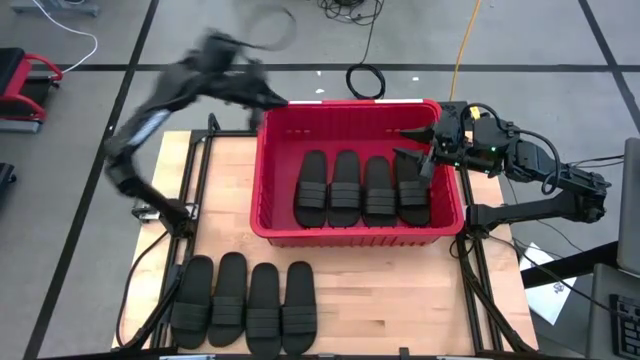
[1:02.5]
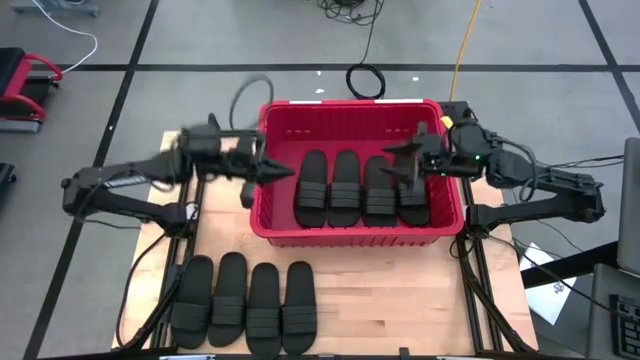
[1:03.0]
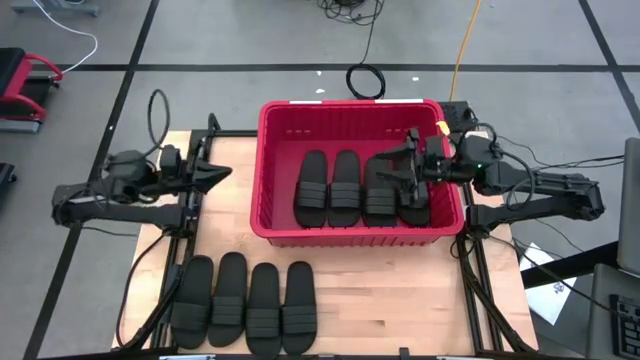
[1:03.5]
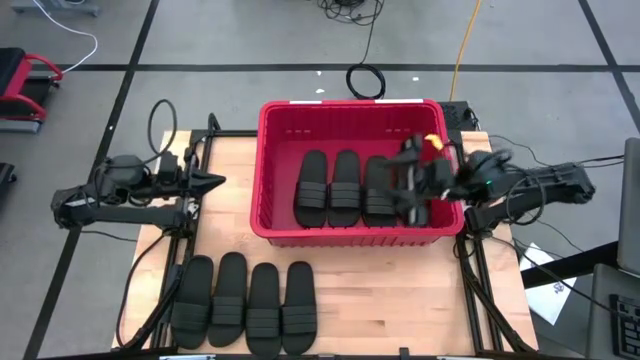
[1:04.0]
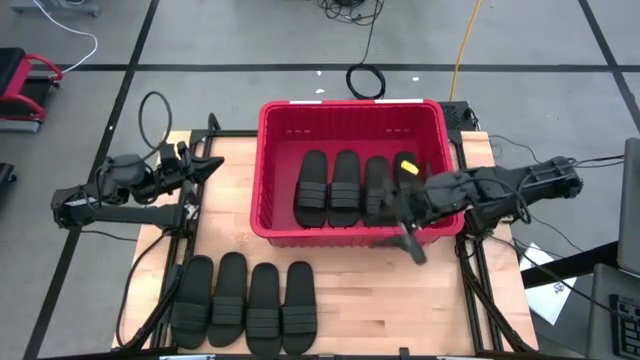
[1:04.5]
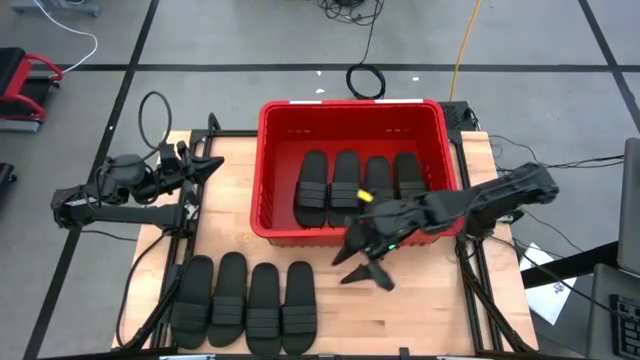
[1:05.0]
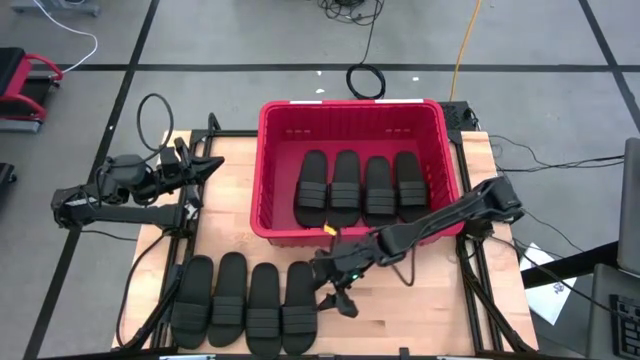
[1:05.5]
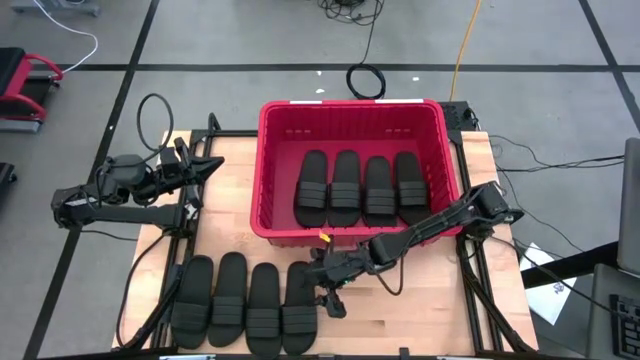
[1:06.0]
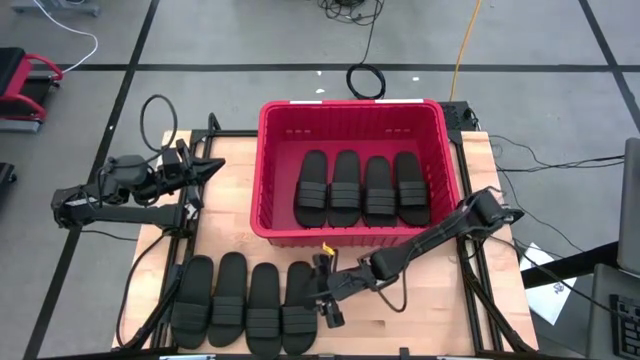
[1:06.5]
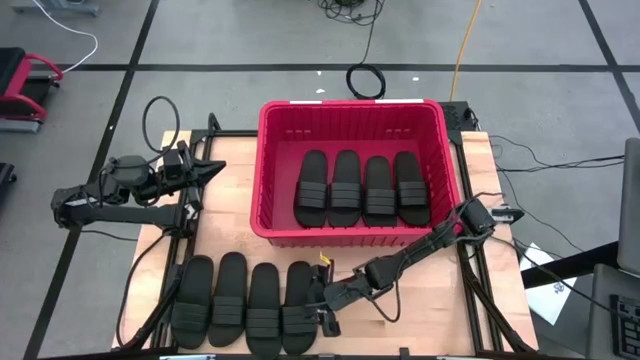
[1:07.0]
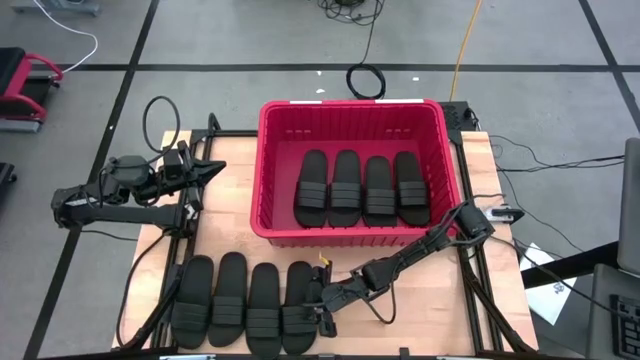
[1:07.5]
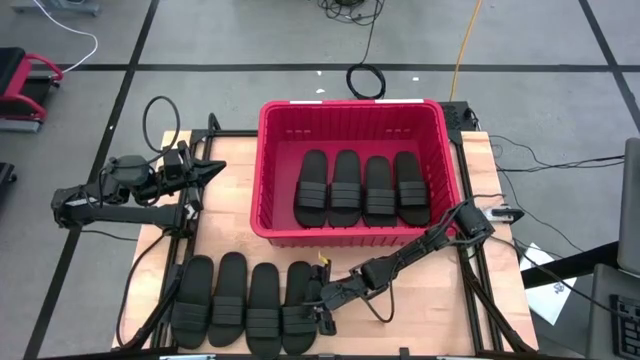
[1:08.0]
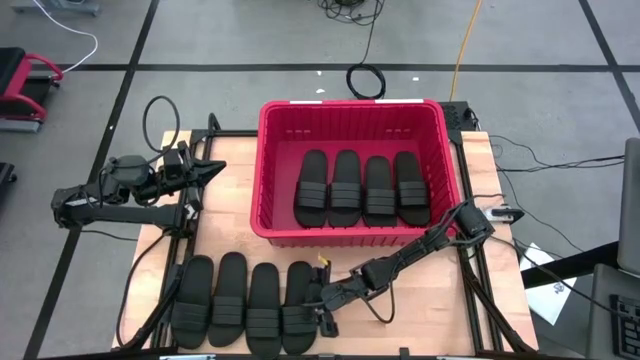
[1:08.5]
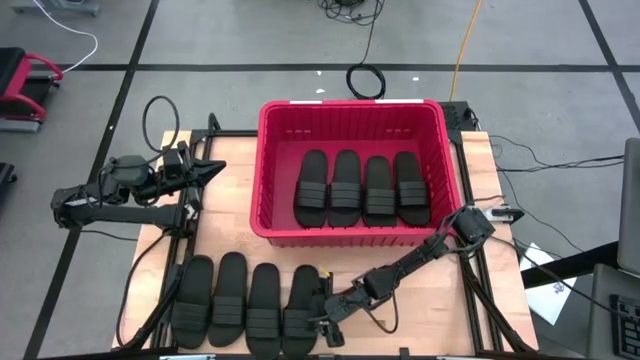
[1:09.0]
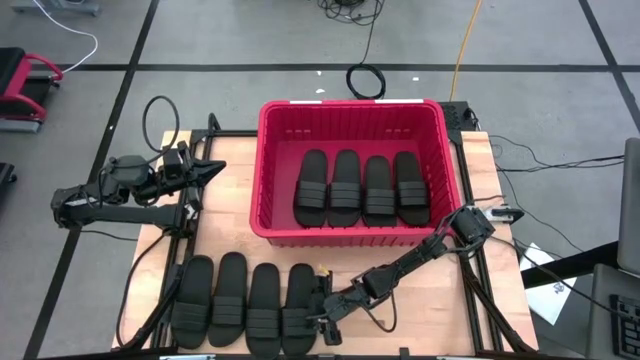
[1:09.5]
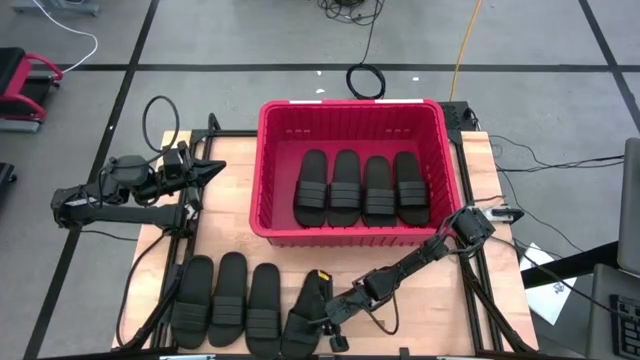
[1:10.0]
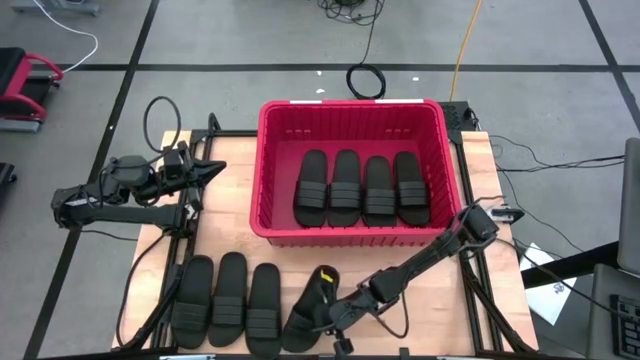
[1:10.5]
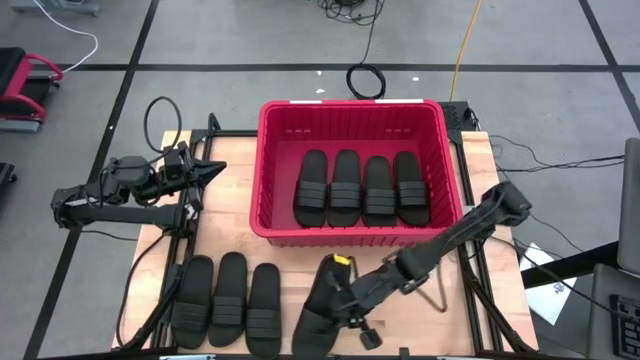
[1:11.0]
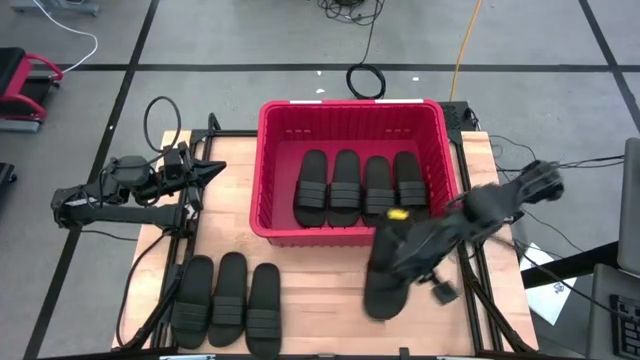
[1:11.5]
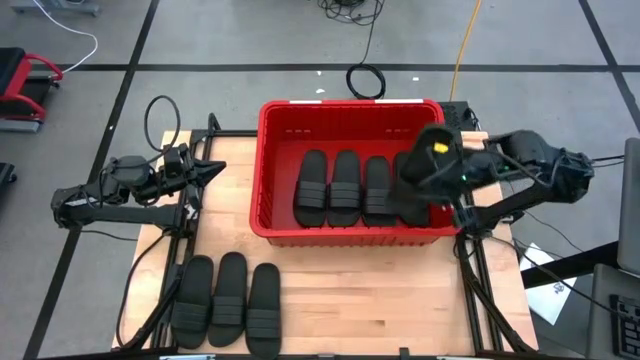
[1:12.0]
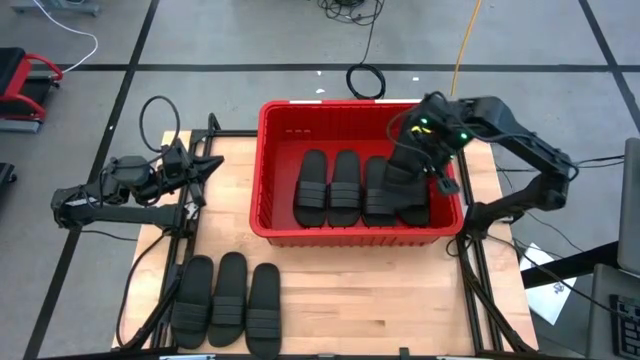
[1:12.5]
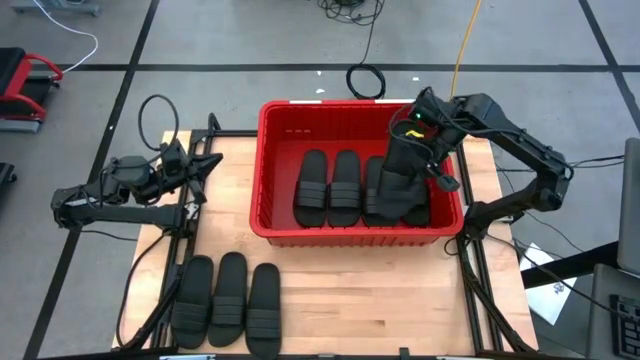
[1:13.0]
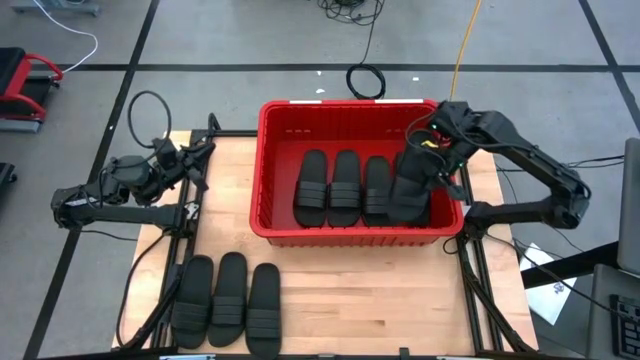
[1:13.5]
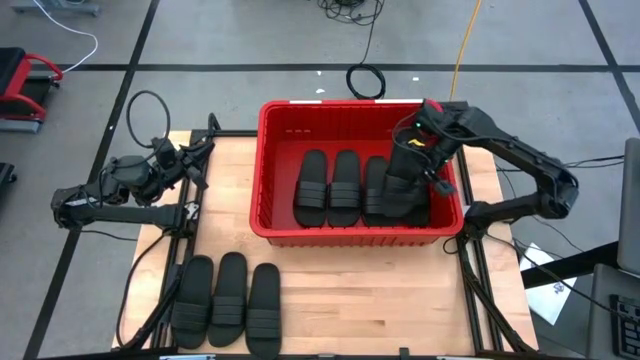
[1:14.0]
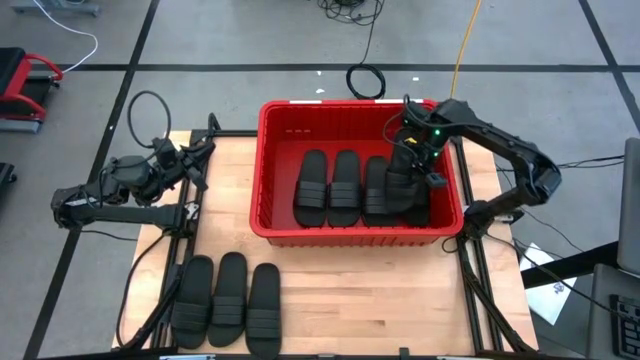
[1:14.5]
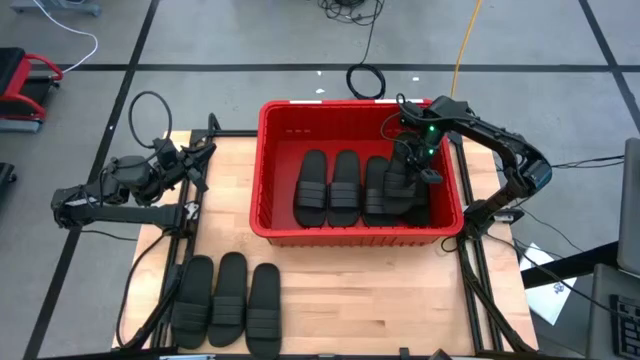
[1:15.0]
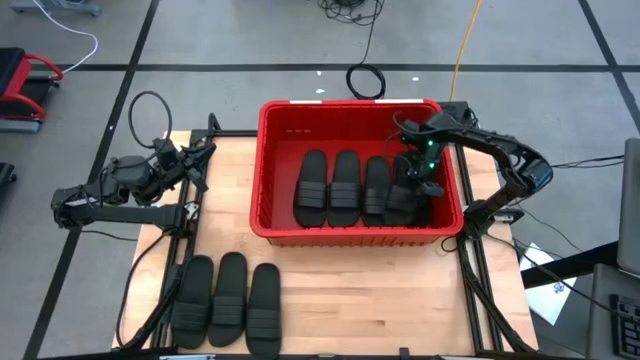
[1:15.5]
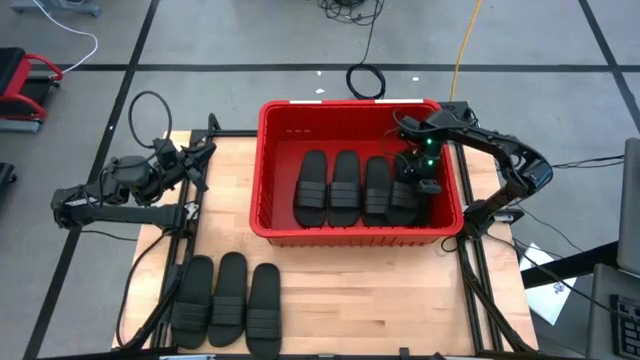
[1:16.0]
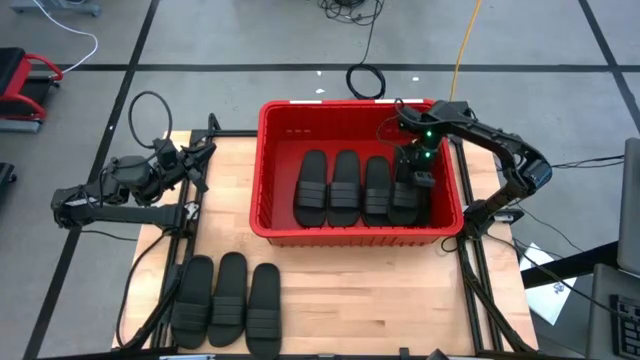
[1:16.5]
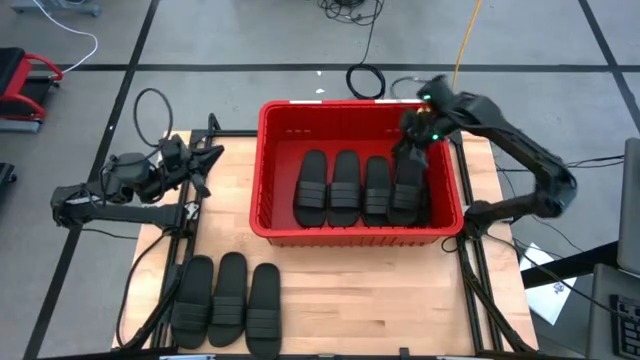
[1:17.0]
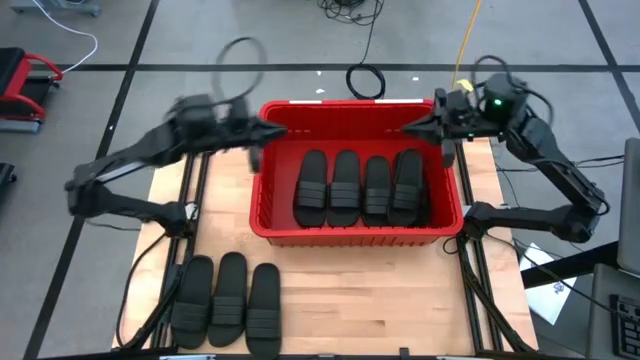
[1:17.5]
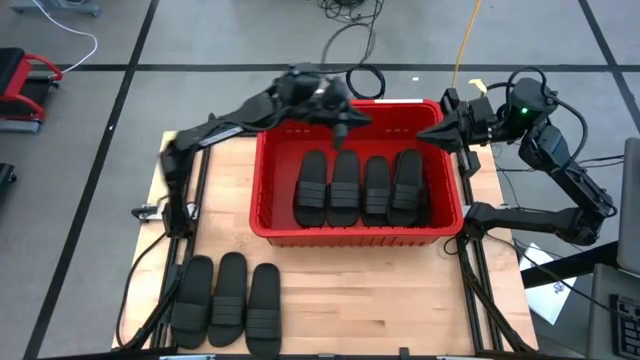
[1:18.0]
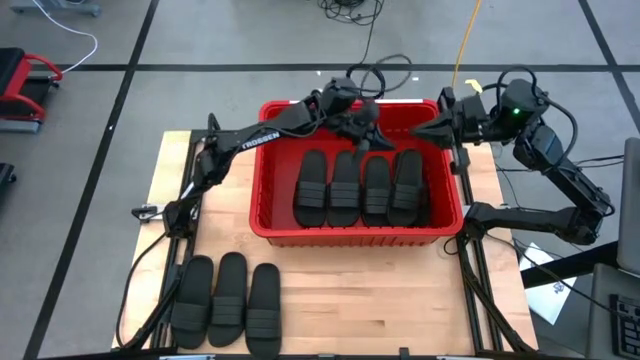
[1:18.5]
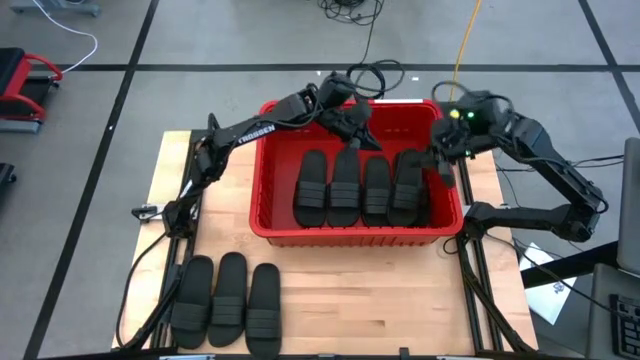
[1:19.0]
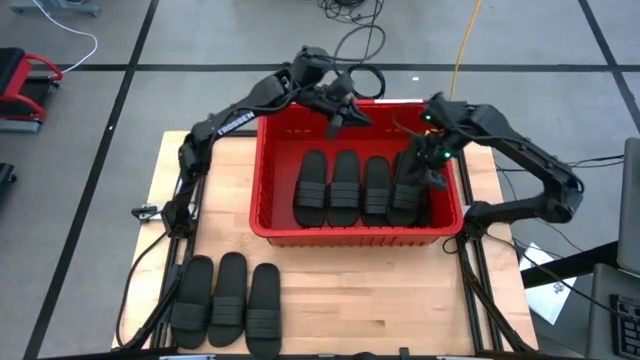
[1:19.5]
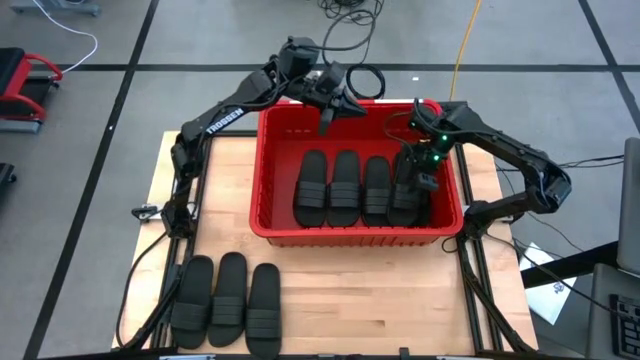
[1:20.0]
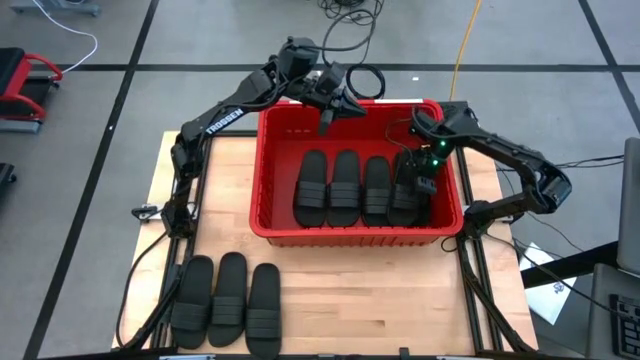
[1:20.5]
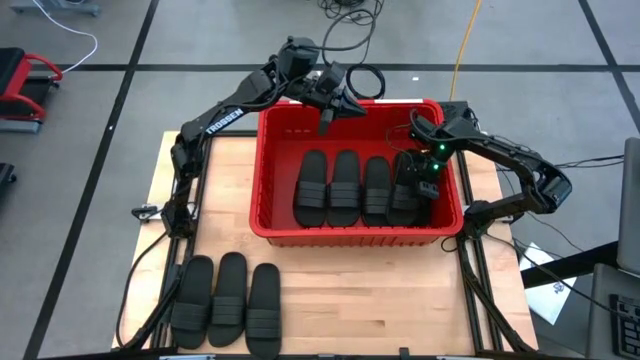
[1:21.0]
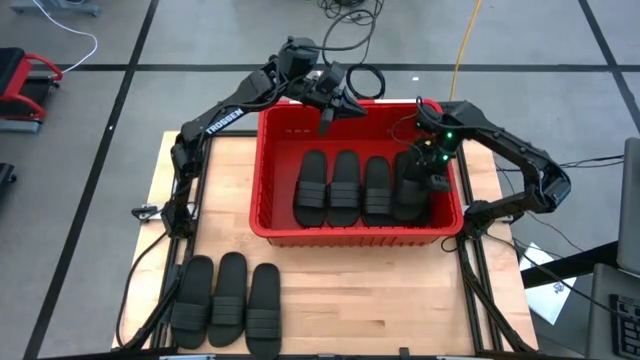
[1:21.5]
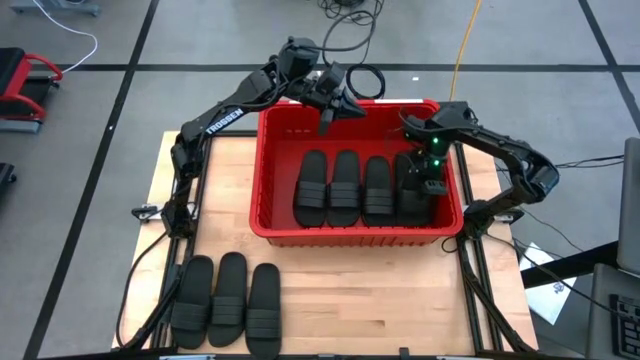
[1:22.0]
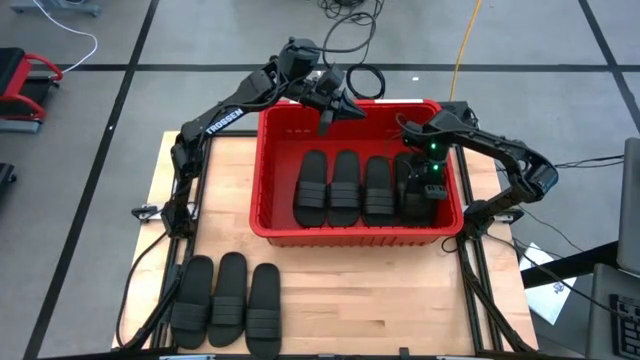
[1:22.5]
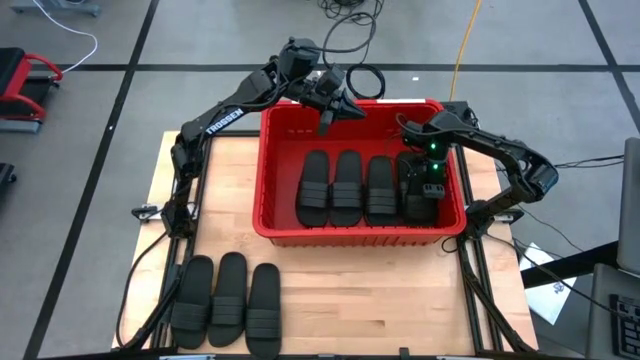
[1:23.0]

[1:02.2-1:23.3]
Task: Pick and place slides into bin
Put the black slide into the red bin
